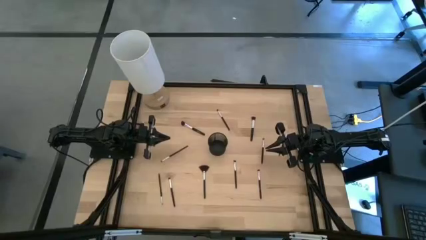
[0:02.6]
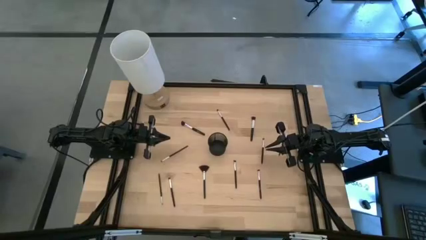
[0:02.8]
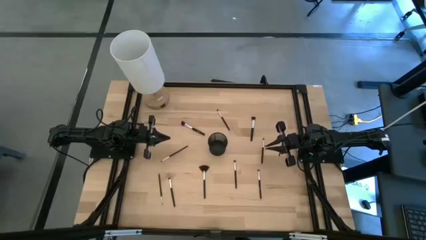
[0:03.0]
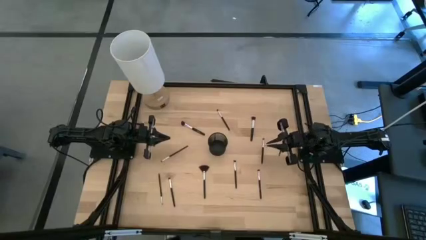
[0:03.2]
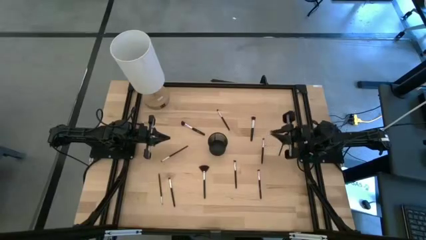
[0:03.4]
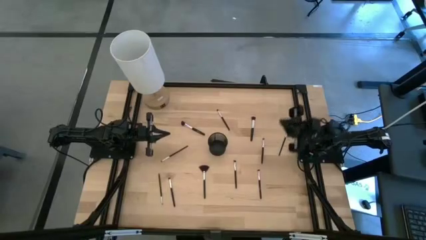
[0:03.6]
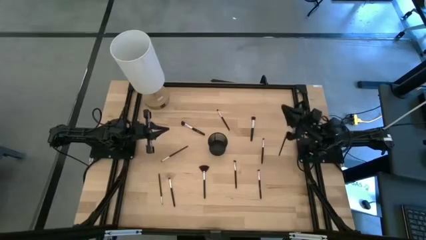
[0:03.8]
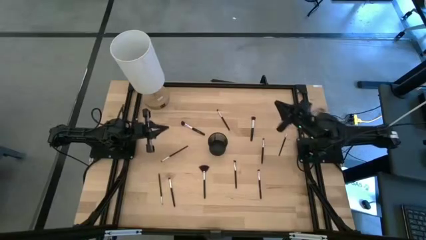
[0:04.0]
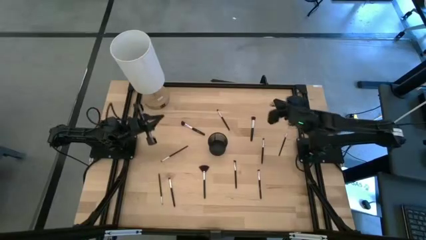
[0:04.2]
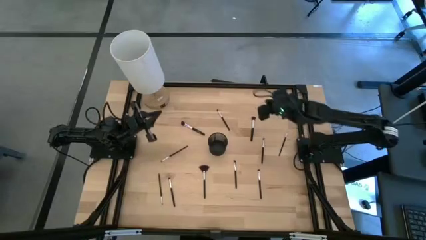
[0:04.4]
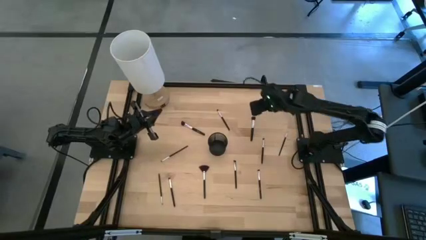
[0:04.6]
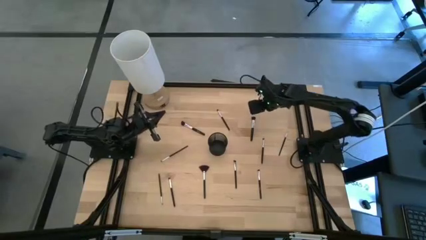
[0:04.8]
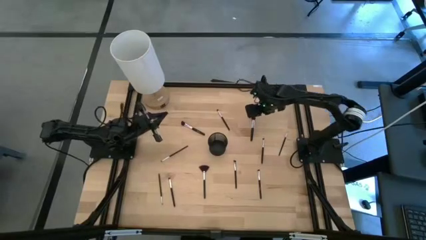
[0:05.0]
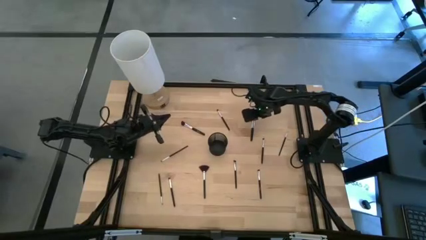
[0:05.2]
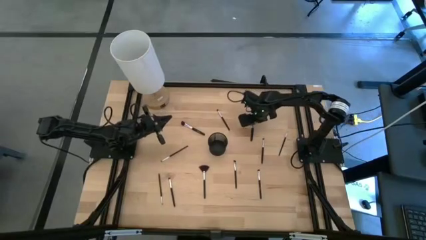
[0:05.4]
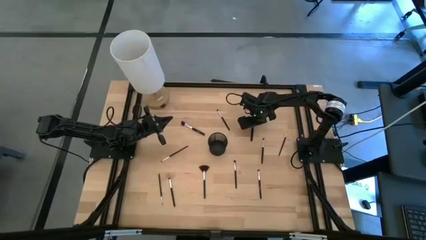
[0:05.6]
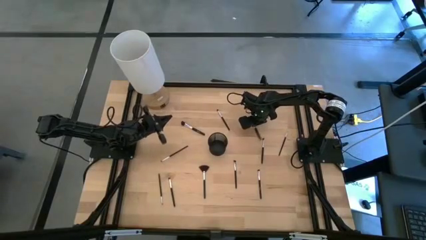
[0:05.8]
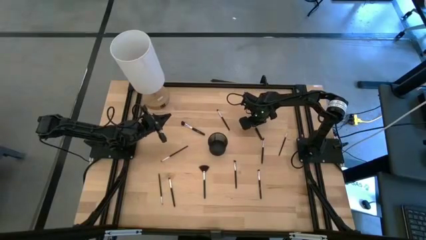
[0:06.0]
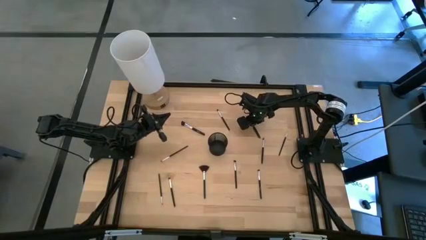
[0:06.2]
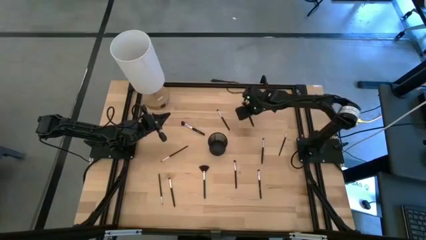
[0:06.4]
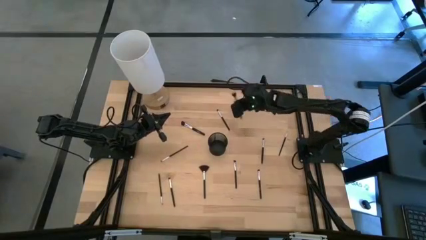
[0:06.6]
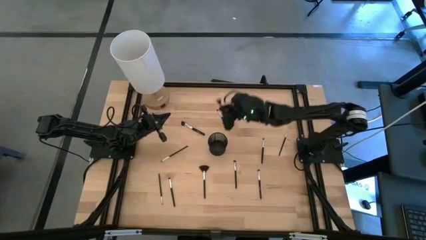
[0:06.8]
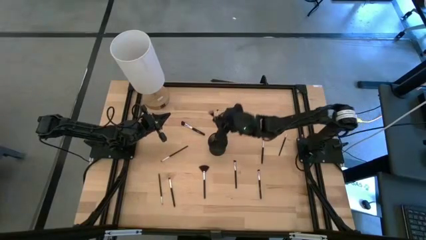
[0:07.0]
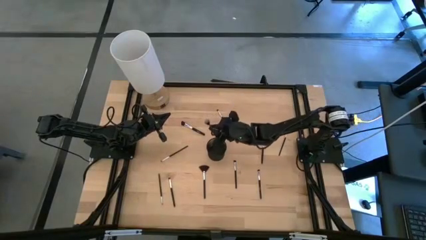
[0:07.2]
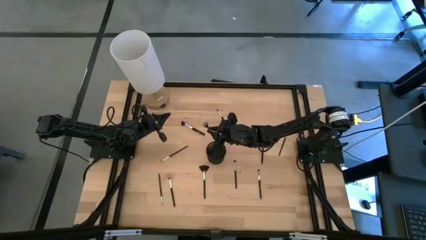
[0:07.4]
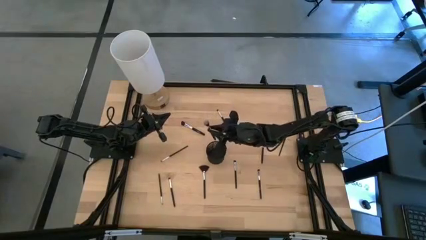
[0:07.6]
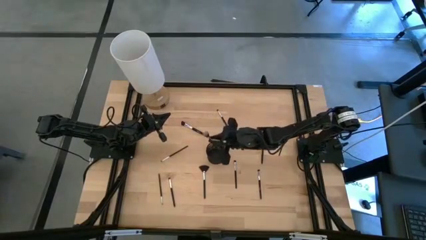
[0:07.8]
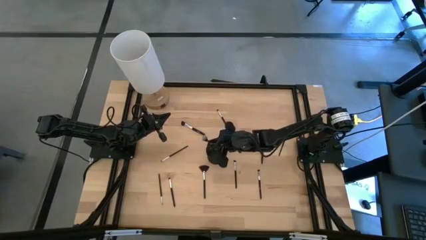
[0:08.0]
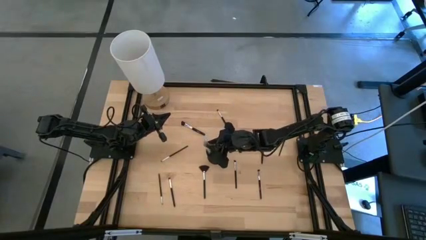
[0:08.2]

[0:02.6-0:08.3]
Task: Pick & Place Makeup Brushes
Put the blush brush into the makeup organizer

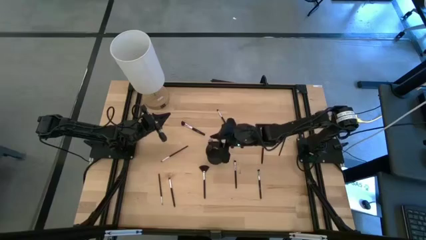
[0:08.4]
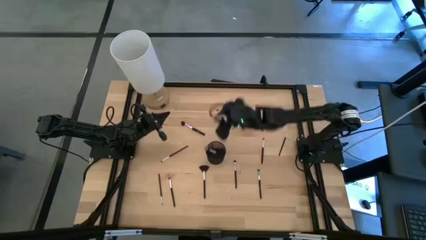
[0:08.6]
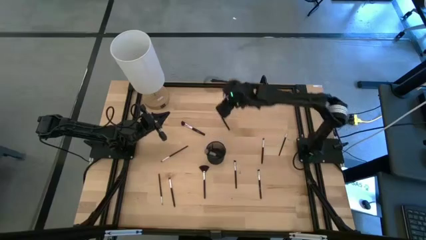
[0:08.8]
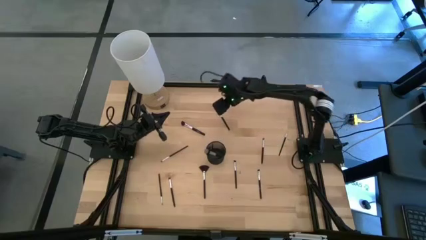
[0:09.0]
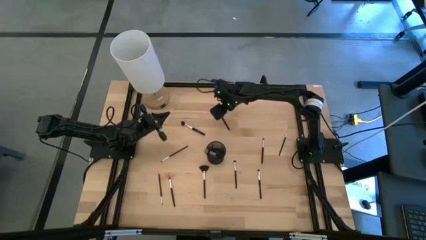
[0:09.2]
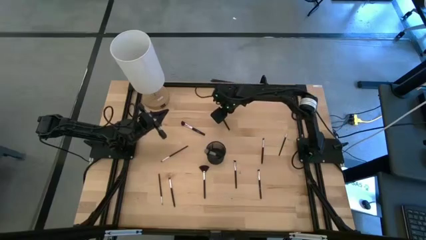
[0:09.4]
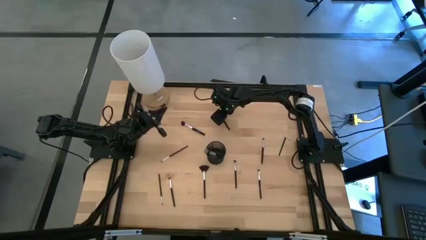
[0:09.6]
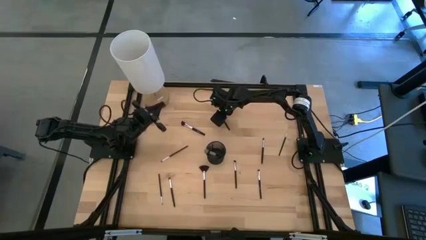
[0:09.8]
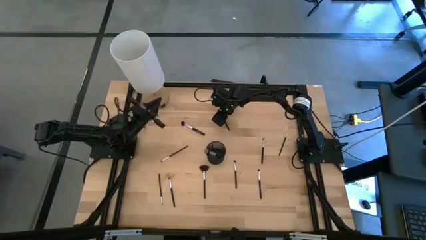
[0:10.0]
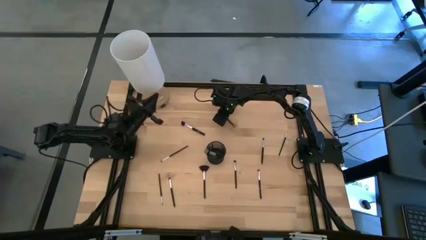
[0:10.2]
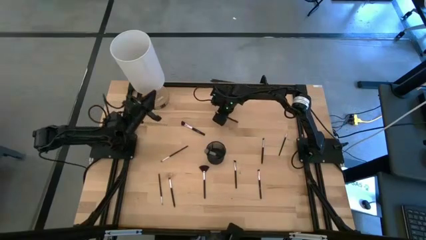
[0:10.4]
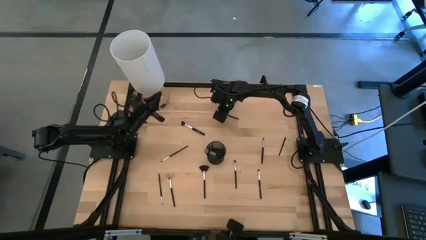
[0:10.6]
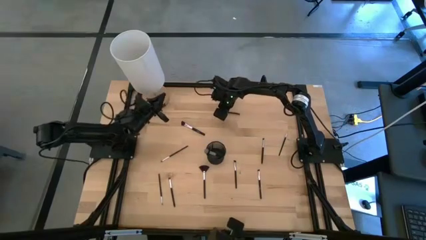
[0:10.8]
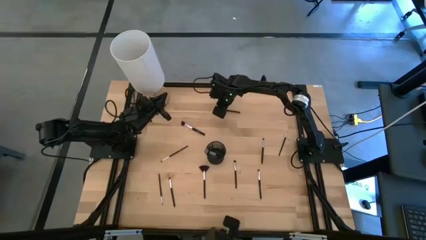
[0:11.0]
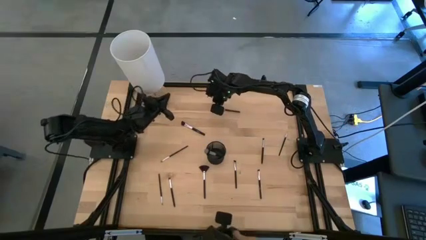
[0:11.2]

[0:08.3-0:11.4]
Put the eyeshadow brush into the makeup organizer

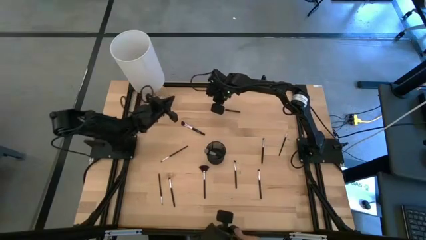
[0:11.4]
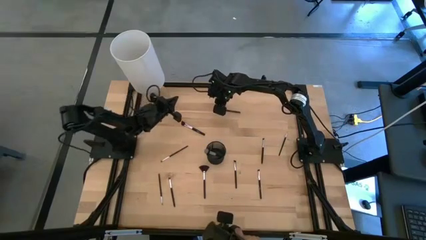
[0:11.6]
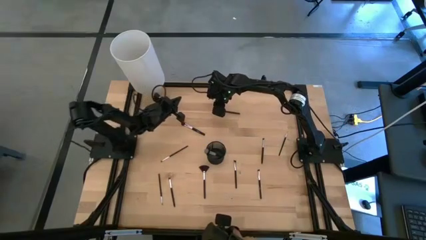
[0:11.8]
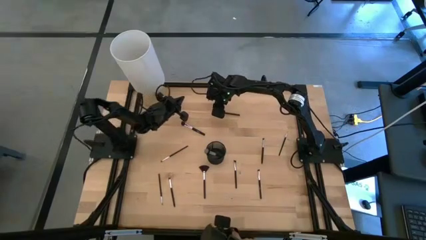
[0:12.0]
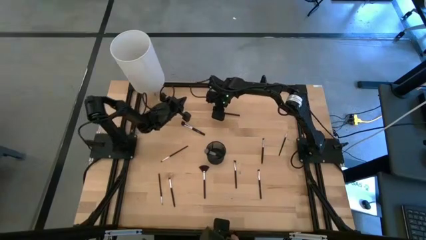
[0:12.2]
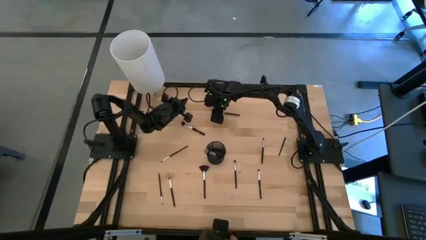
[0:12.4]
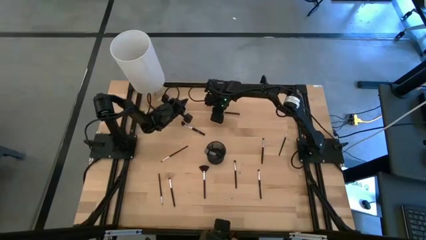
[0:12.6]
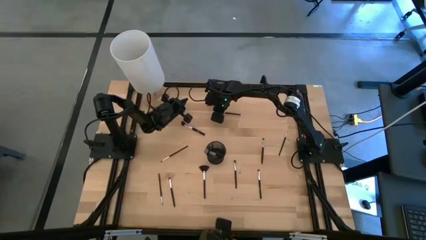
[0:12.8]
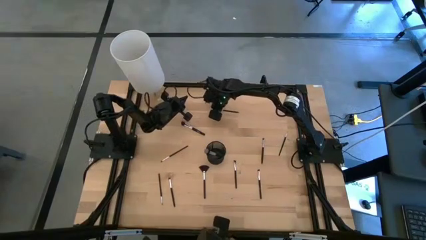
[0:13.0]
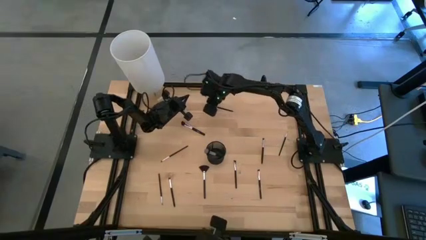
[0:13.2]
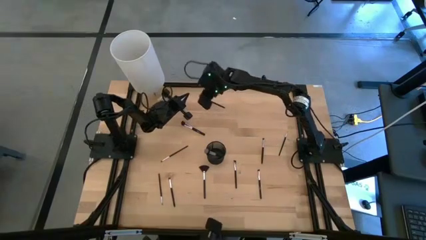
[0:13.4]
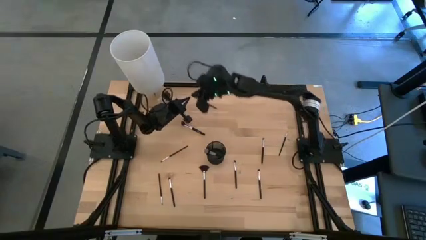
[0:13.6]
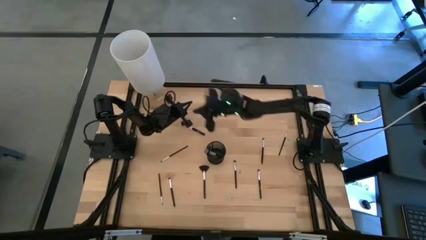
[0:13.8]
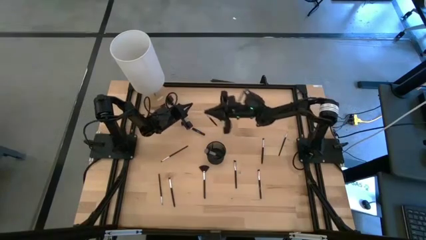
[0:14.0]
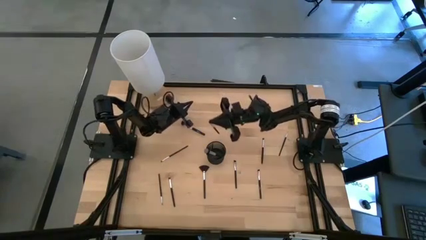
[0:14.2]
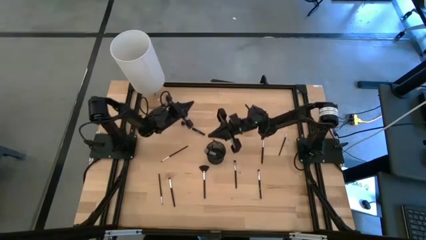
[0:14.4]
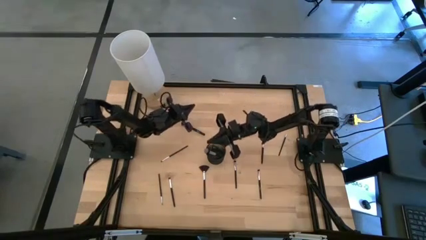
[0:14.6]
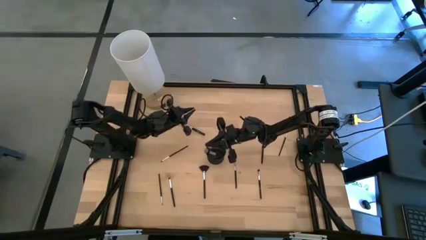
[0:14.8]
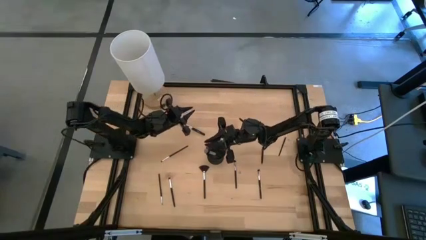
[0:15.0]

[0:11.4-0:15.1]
Put the eyeshadow brush into the makeup organizer

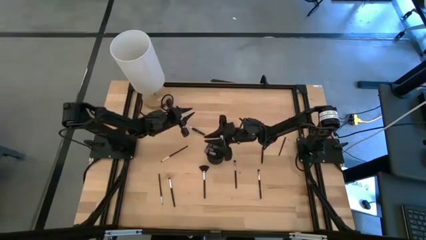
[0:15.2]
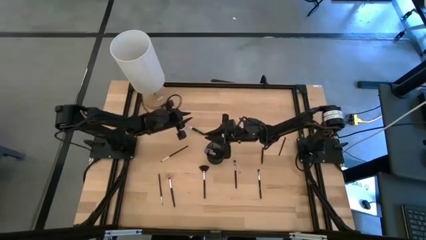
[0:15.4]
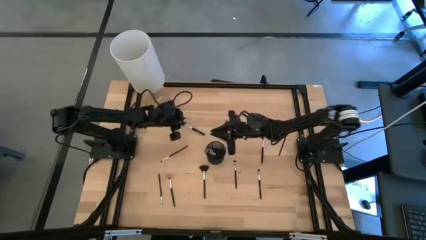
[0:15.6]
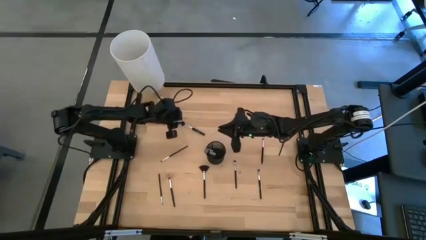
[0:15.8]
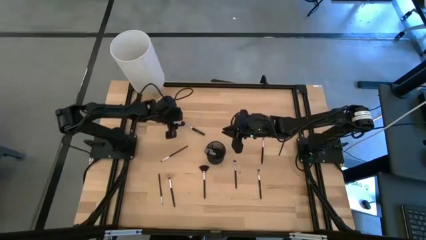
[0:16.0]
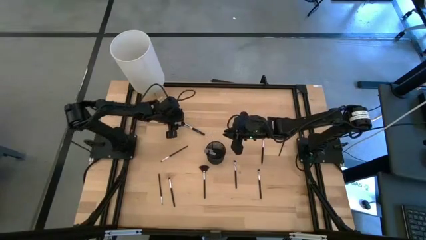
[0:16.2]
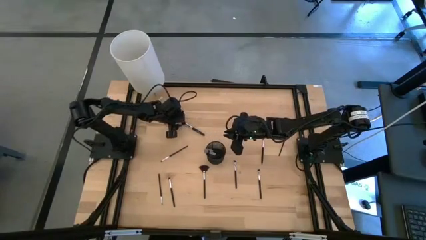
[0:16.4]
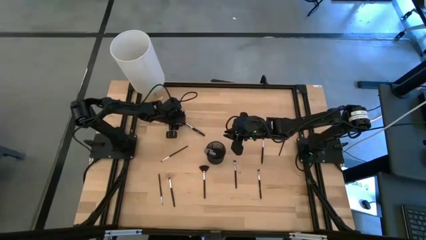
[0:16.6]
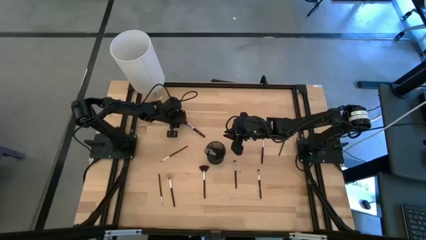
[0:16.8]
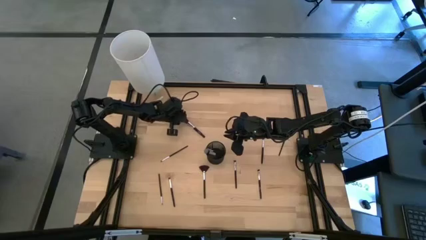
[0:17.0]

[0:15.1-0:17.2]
Put the powder brush into the makeup organizer

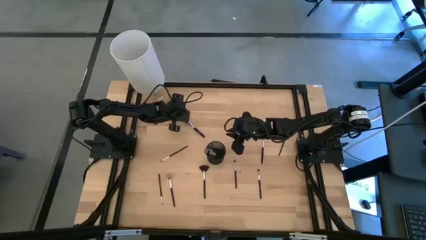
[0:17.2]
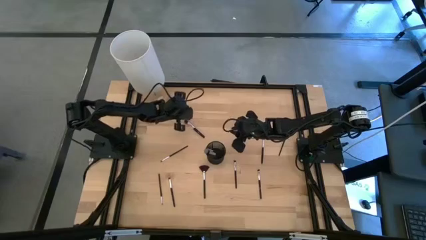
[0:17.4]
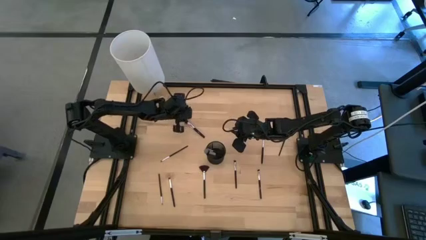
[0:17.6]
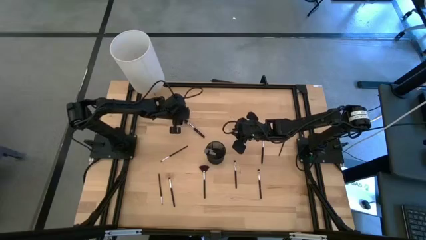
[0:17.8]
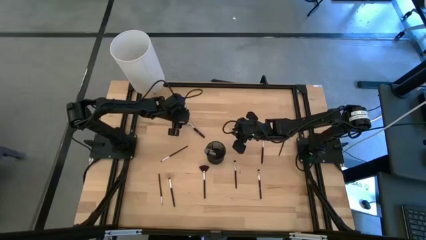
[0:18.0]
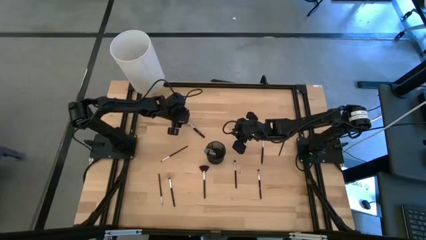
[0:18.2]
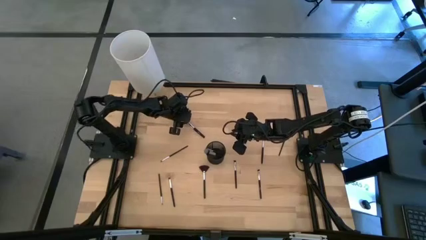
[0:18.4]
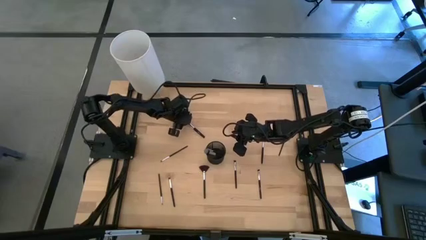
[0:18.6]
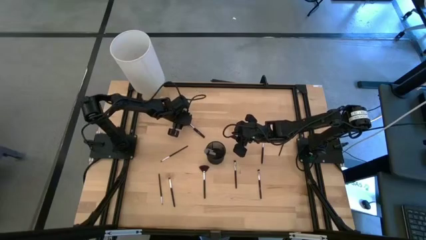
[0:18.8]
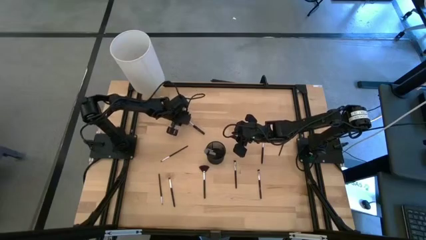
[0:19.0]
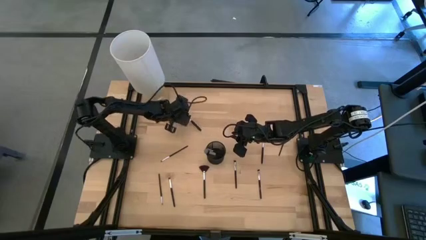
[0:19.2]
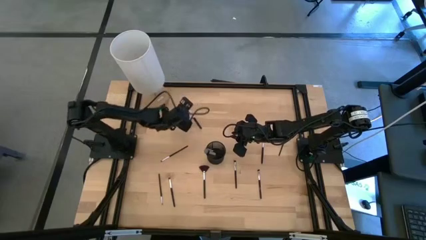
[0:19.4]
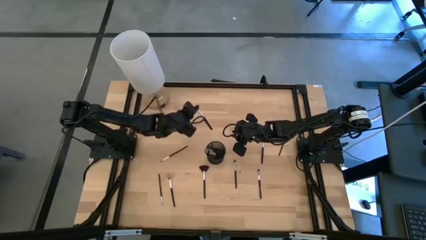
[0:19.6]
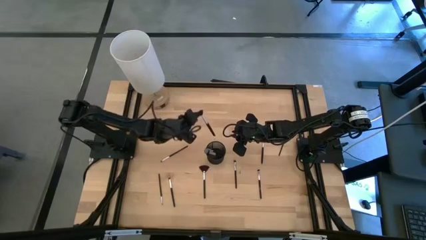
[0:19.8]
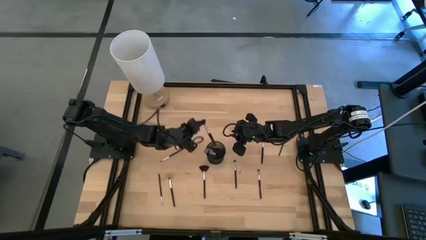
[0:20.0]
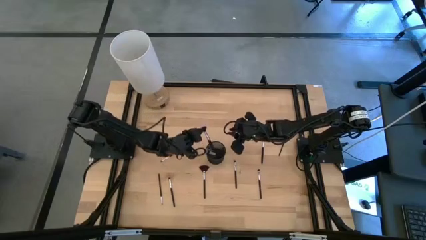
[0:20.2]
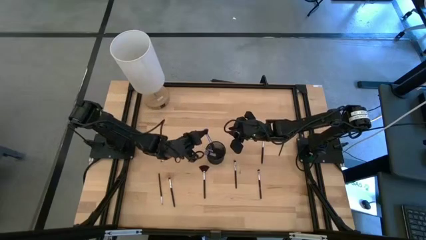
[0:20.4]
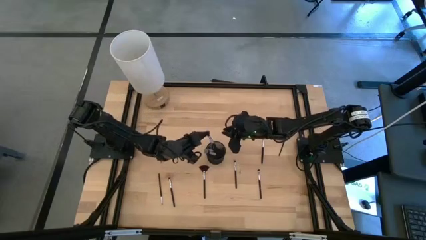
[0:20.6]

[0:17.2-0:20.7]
Put the powder brush into the makeup organizer
